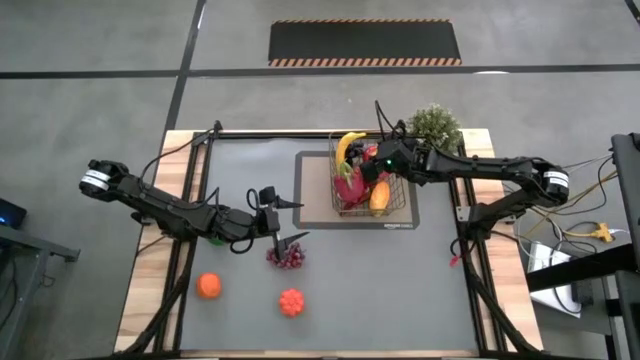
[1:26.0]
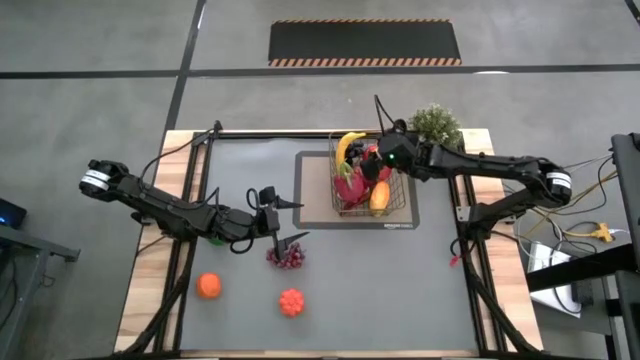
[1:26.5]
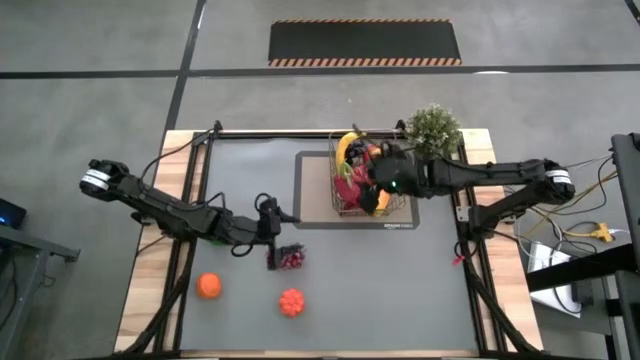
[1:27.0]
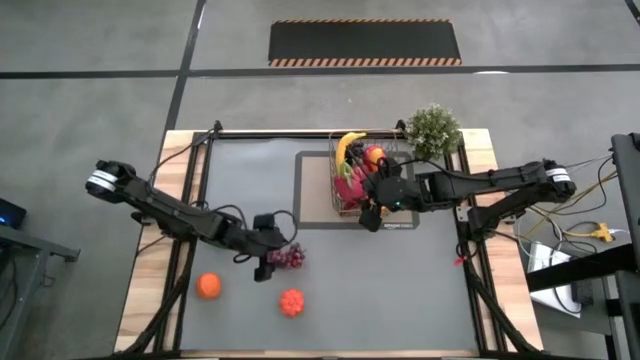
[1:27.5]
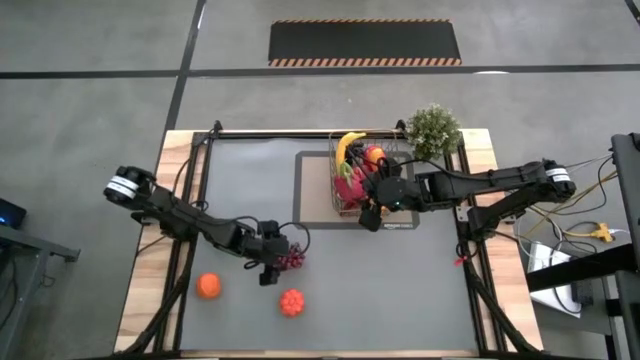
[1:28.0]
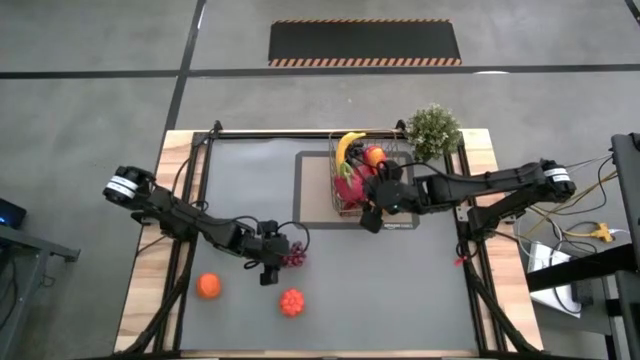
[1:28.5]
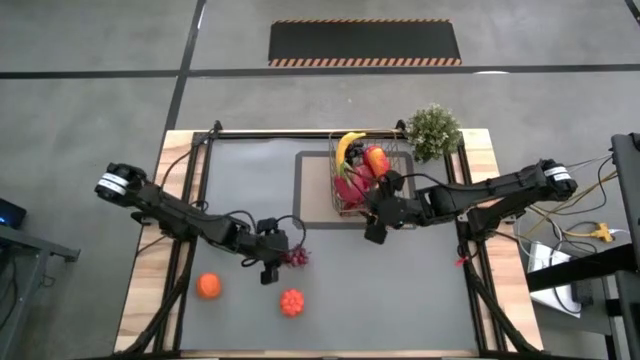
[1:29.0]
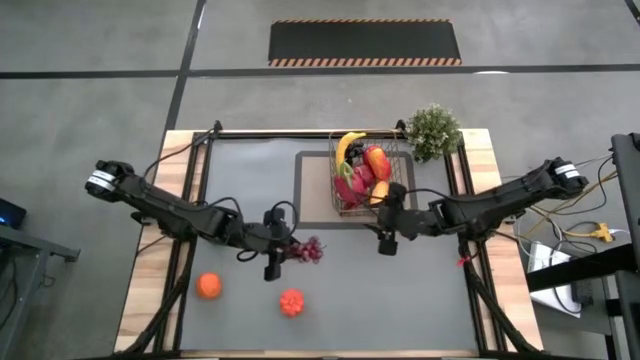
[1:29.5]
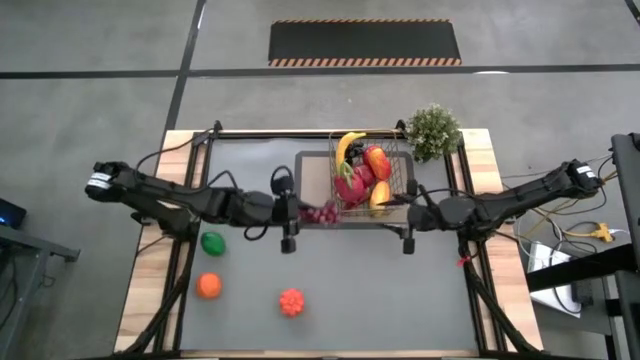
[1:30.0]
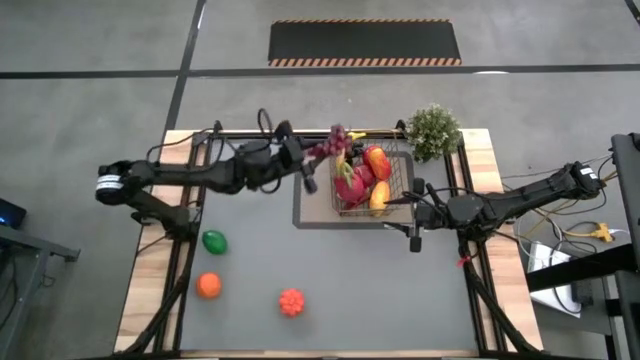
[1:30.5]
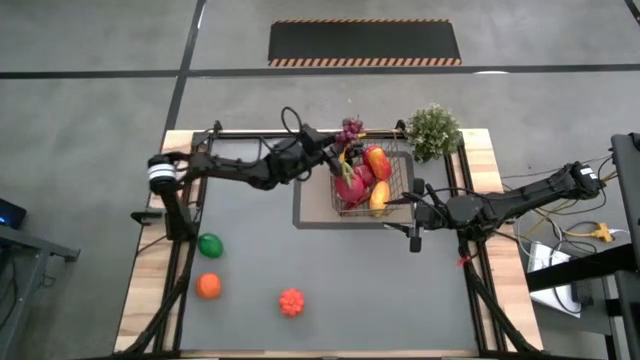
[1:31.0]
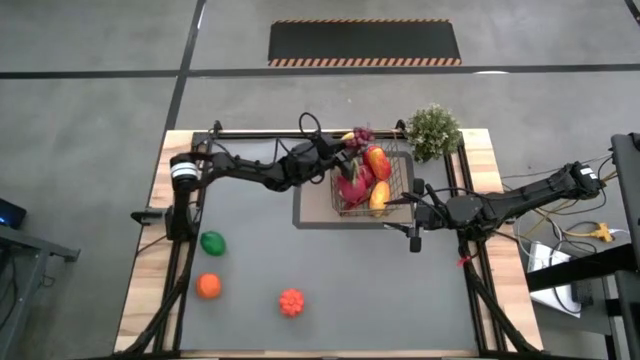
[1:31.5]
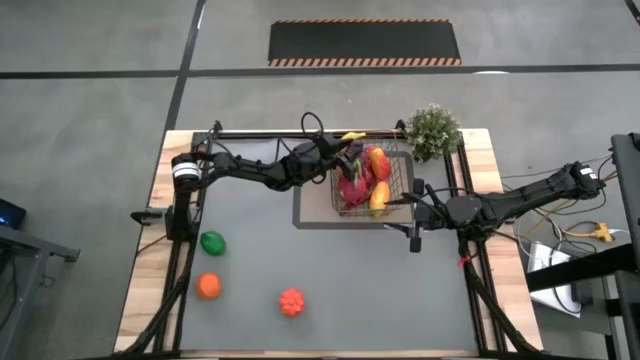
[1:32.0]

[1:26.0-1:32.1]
Task: Build produce basket
Put the red grapes into the wire basket

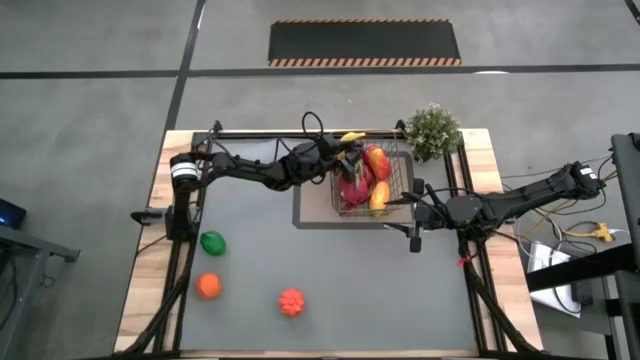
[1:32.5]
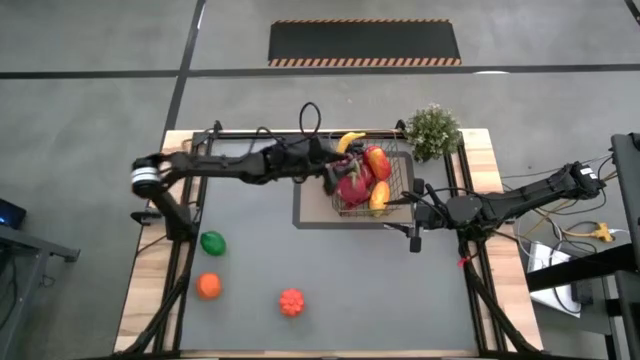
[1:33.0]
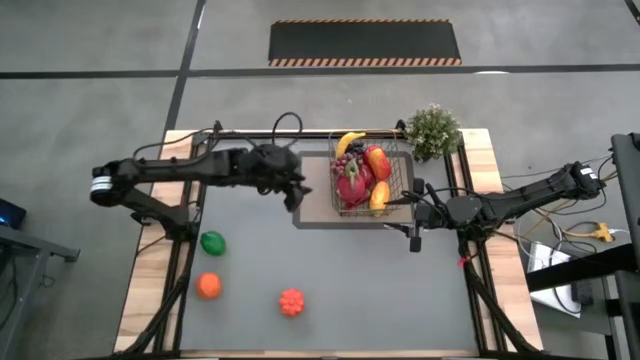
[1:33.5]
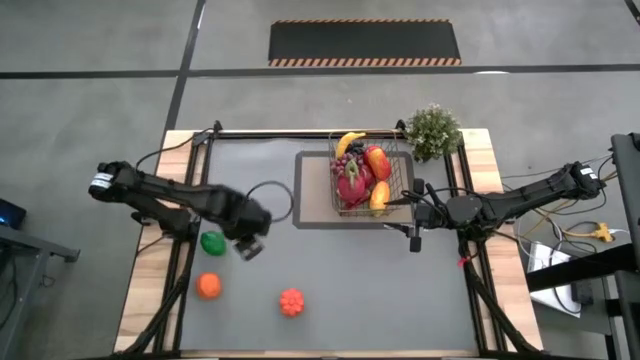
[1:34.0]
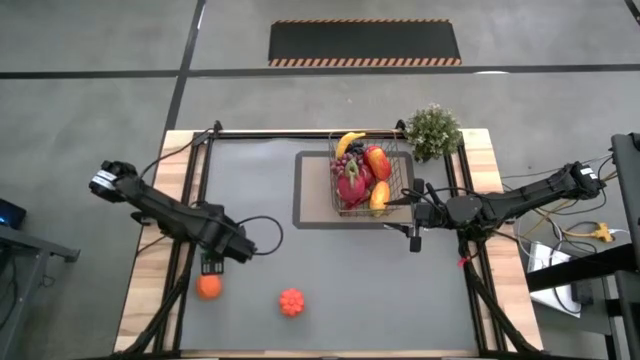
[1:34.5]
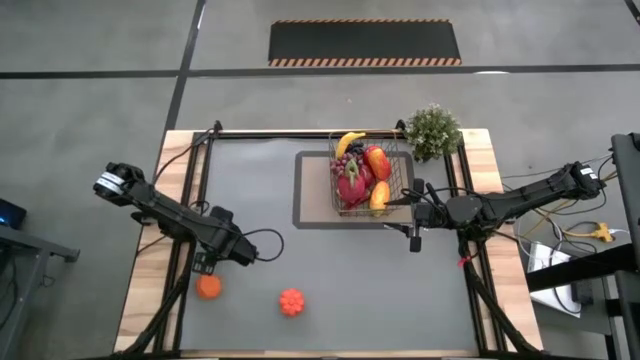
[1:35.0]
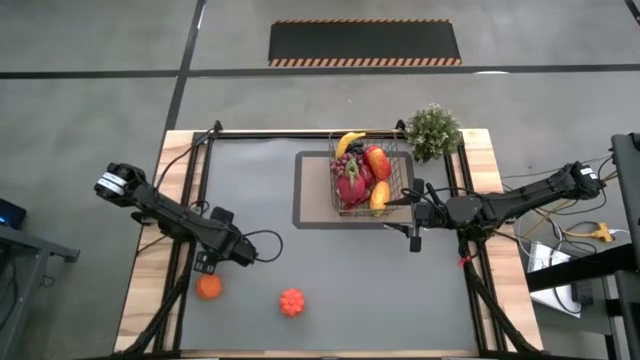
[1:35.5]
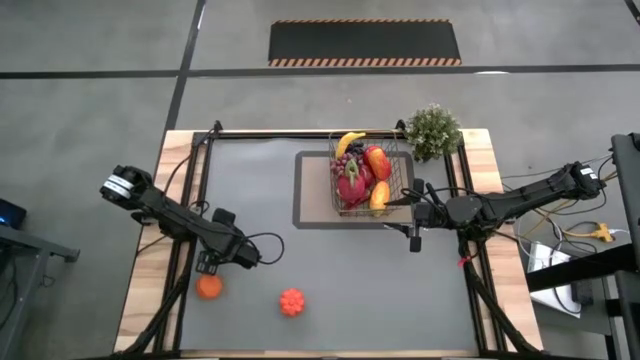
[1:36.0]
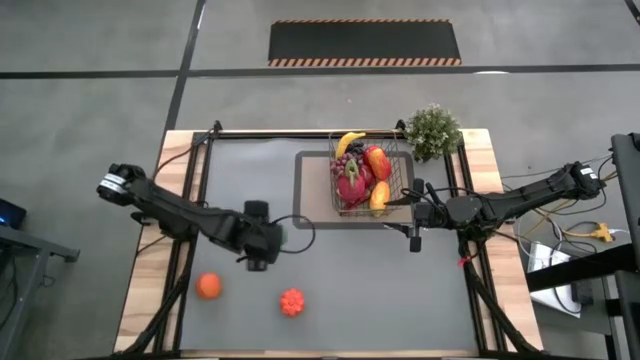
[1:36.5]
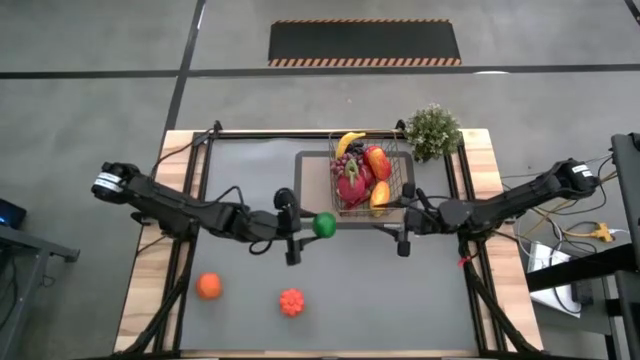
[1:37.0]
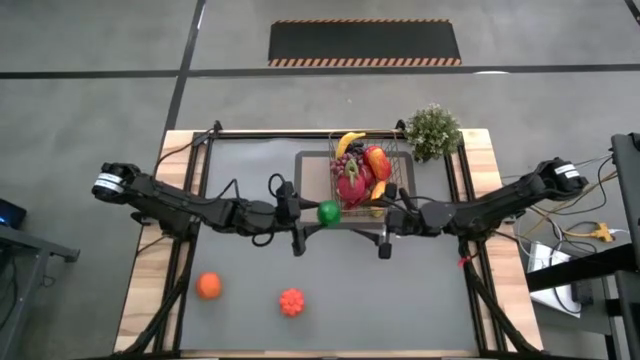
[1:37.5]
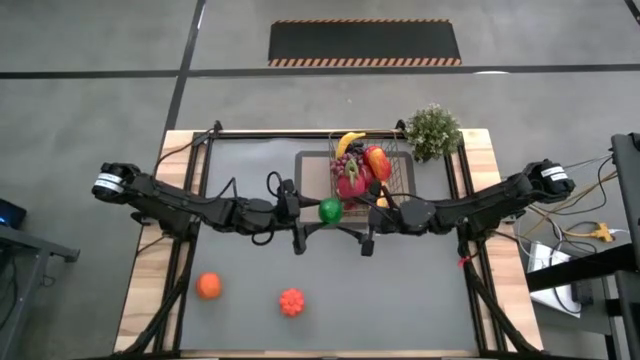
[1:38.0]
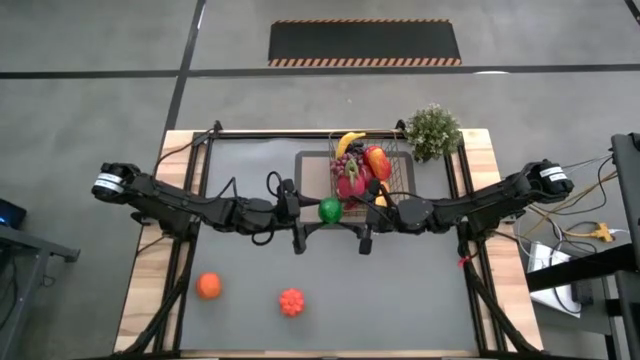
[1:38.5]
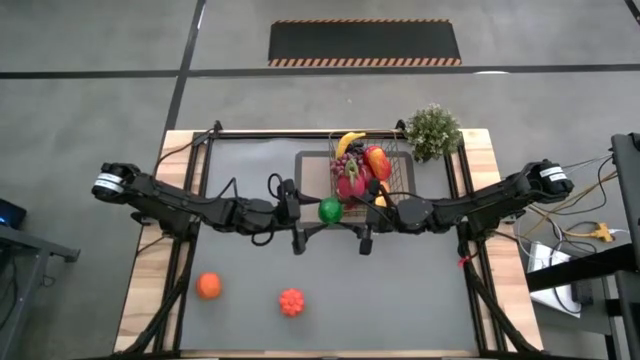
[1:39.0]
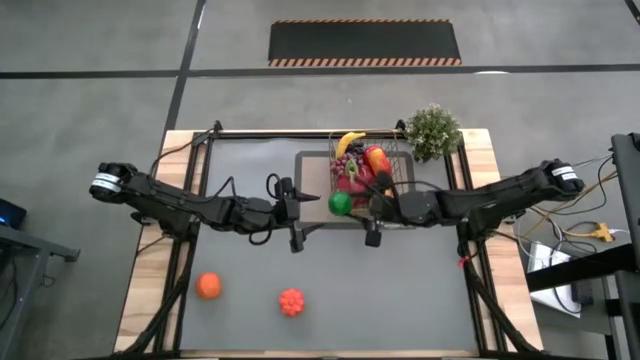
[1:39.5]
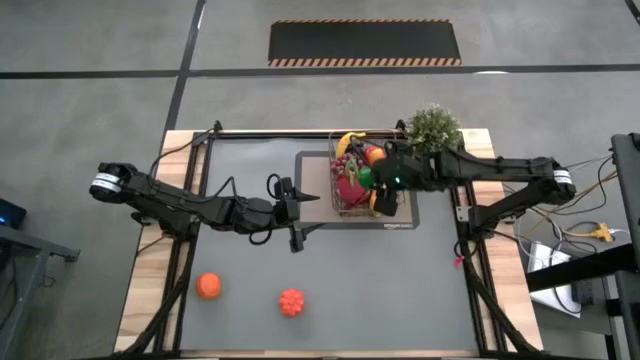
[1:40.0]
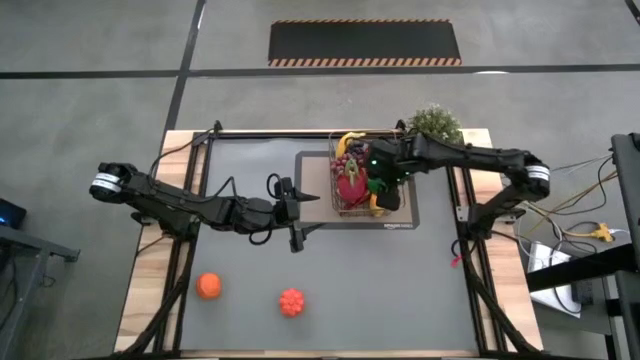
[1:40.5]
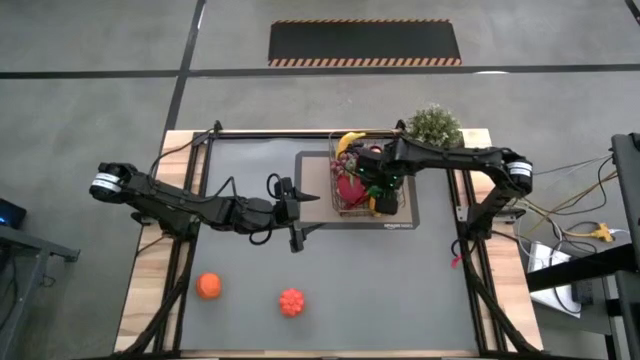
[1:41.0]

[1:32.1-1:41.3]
Put the lime into the wire basket

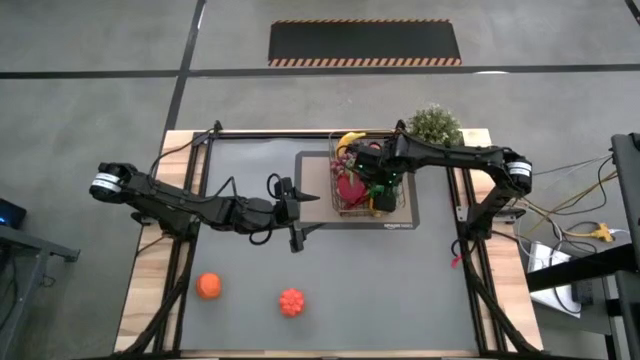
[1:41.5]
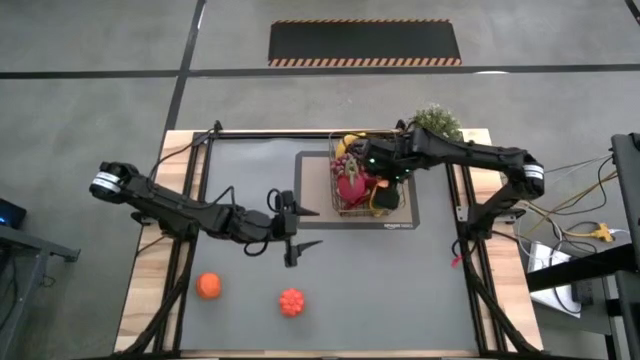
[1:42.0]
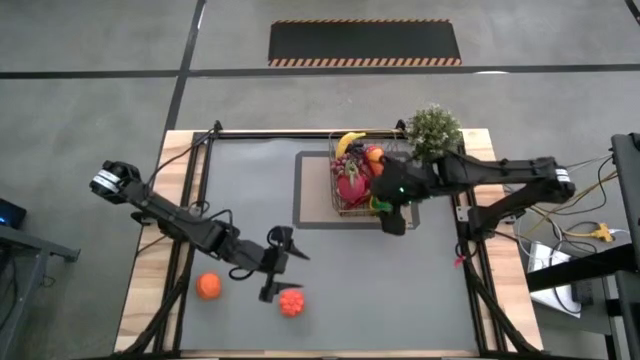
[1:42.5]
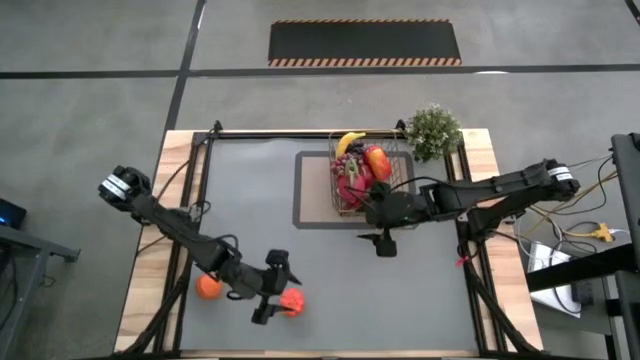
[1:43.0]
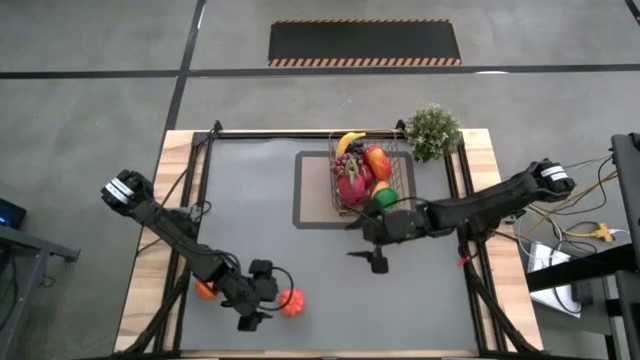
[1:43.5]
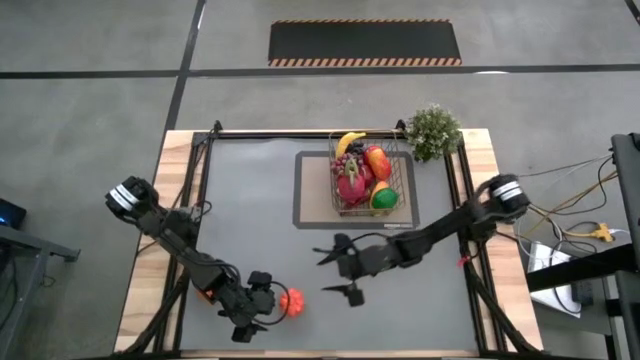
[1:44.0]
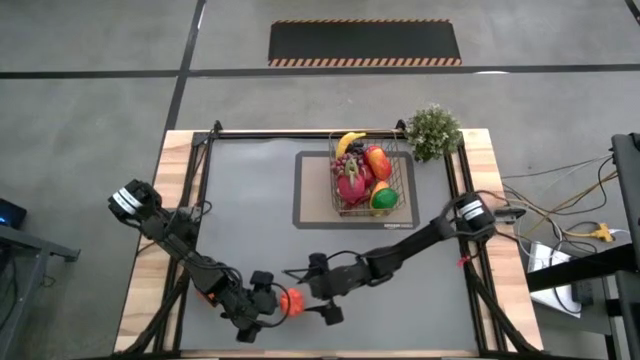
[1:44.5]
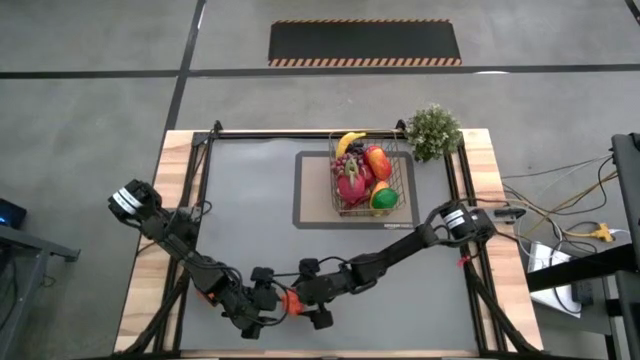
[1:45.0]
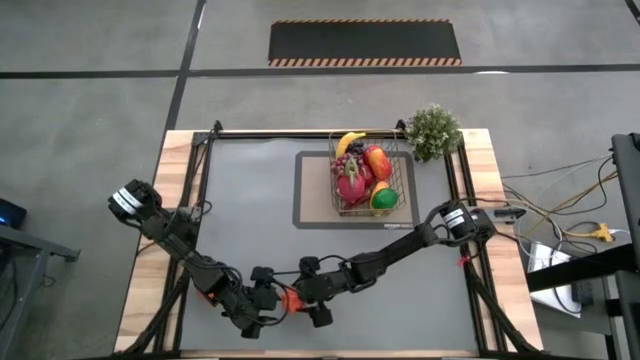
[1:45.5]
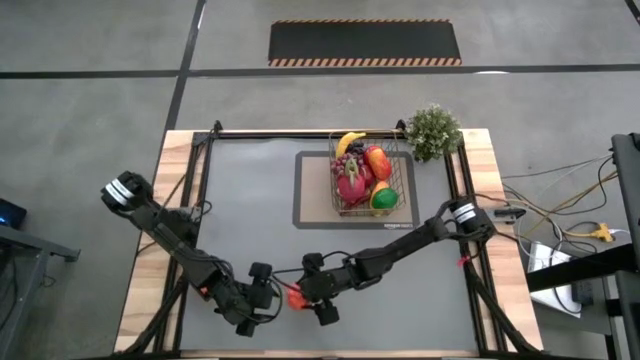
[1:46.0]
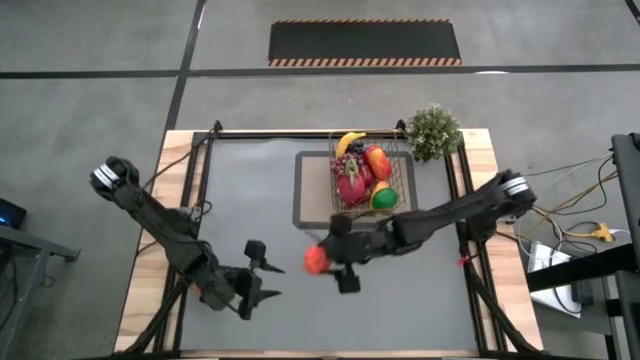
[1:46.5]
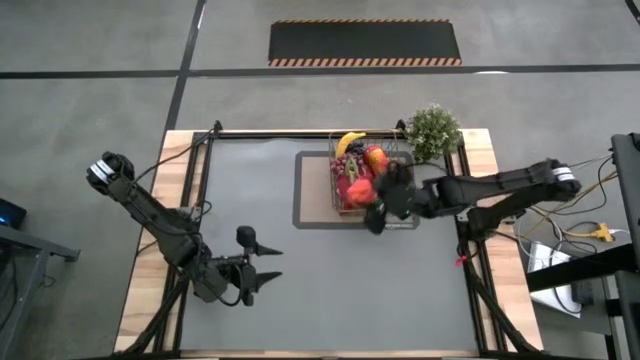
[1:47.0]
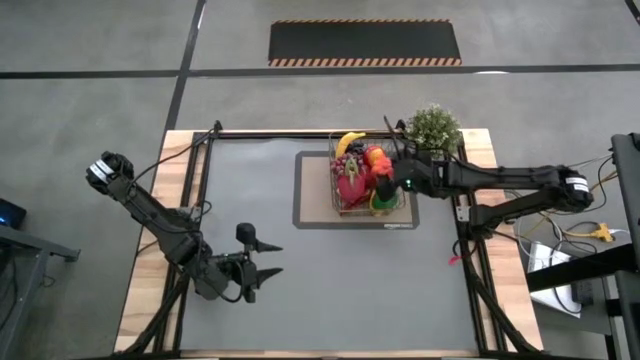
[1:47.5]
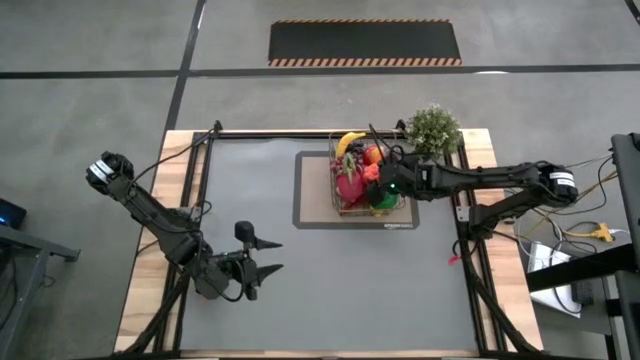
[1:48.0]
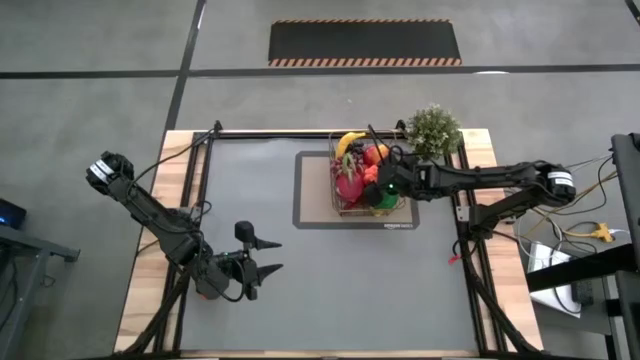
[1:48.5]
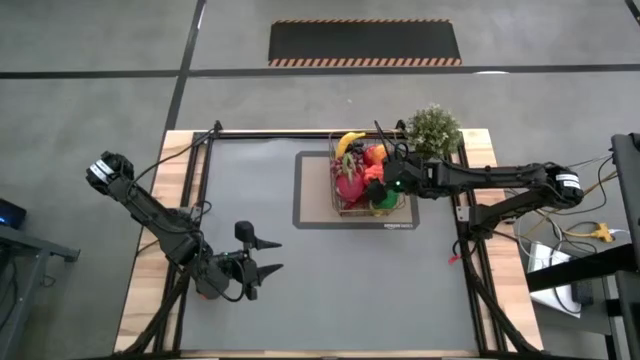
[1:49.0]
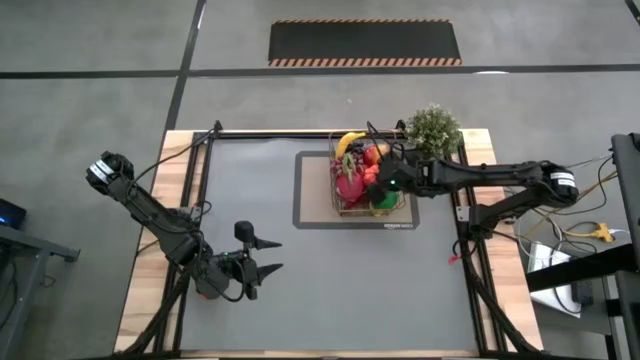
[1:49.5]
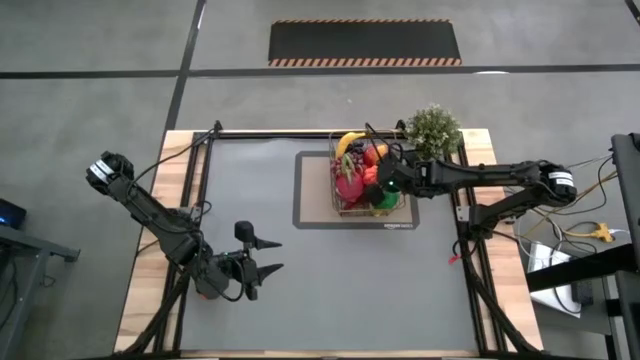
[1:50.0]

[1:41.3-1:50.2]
Put the tangerine into the wire basket
